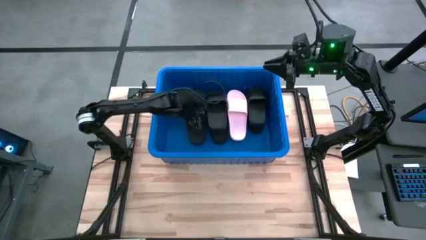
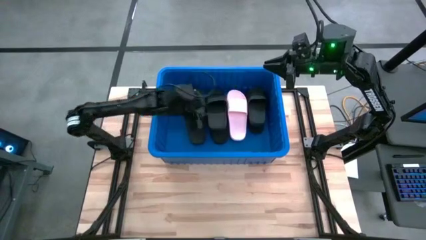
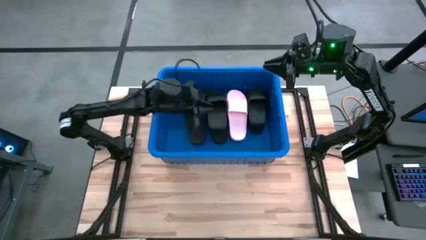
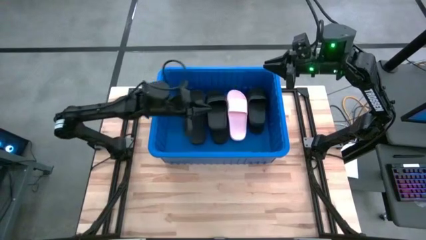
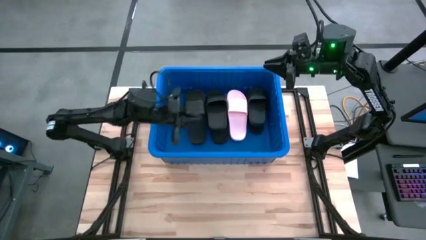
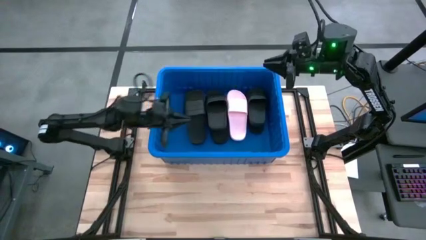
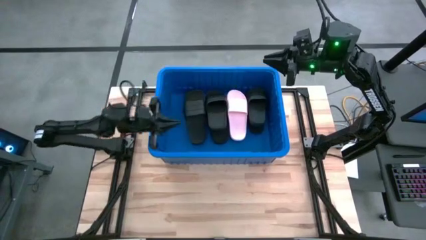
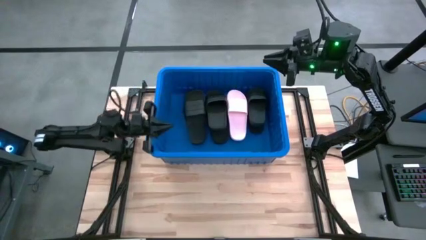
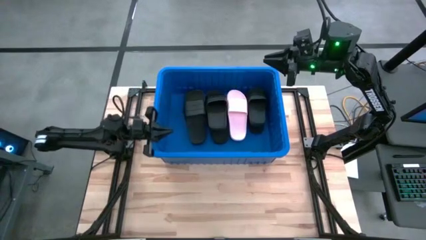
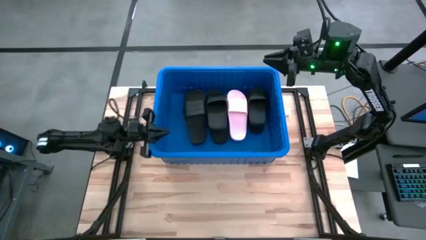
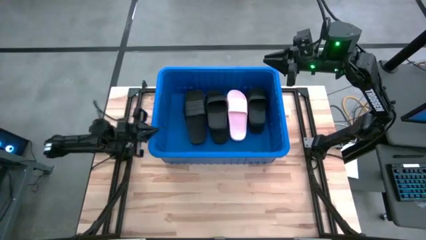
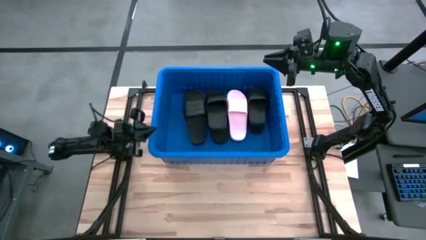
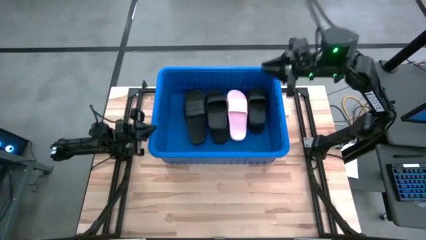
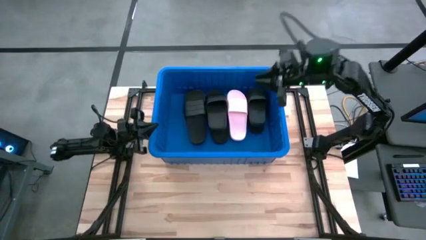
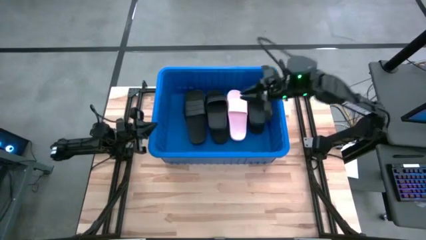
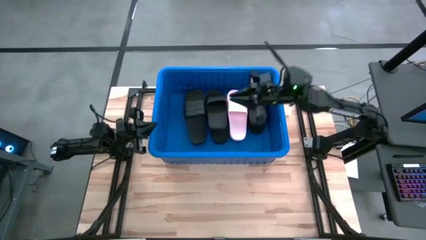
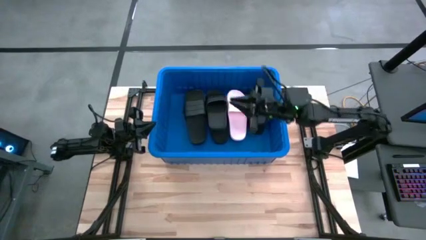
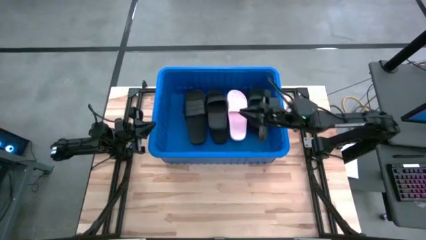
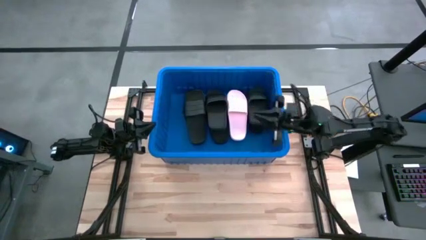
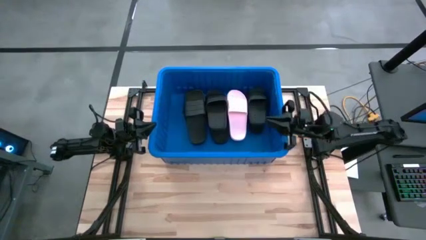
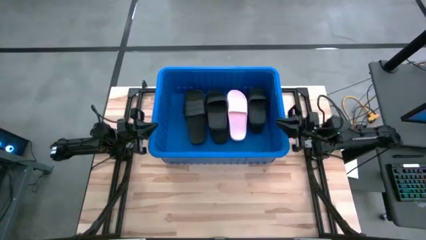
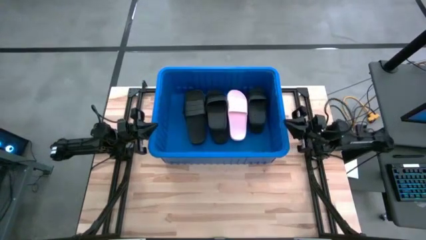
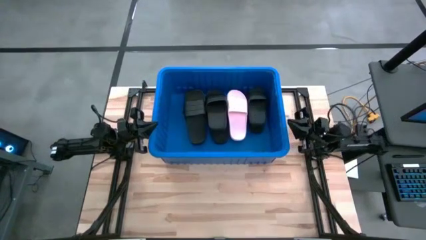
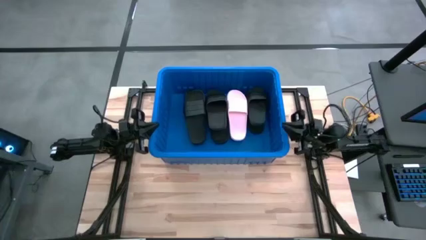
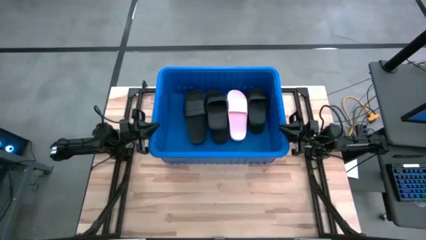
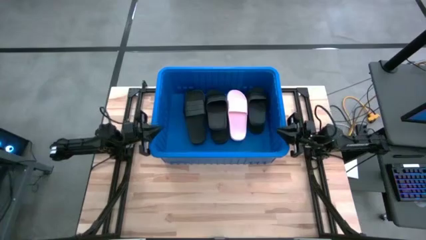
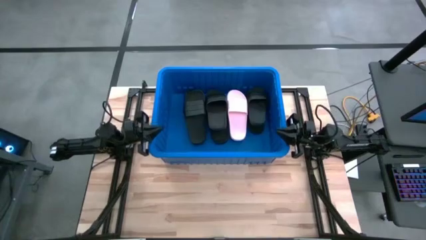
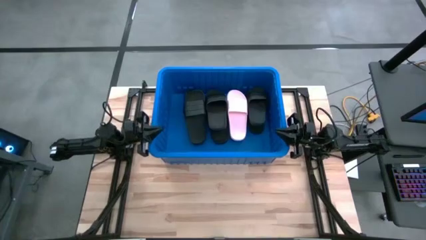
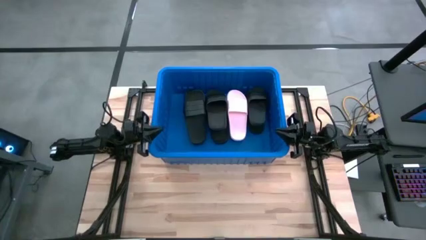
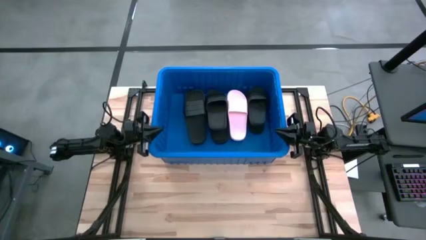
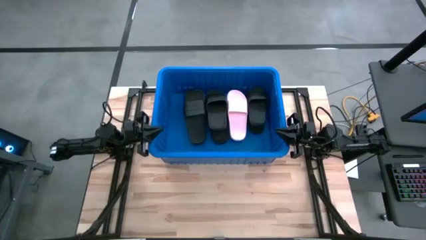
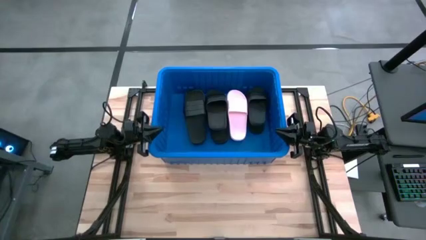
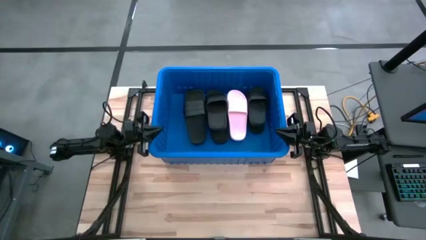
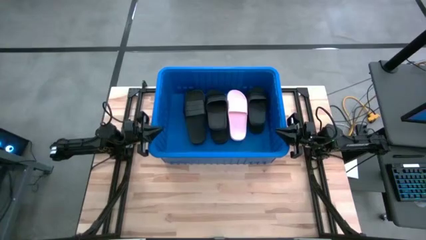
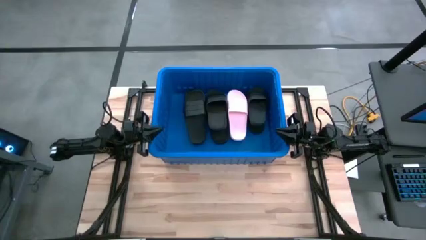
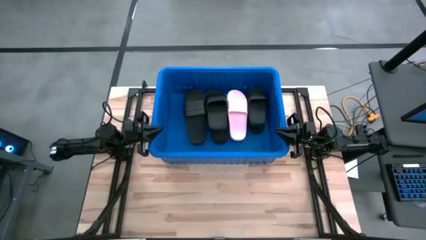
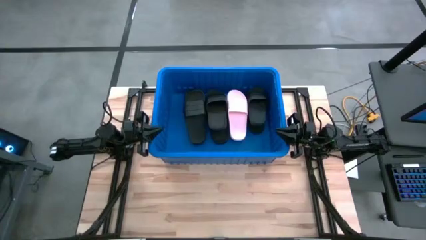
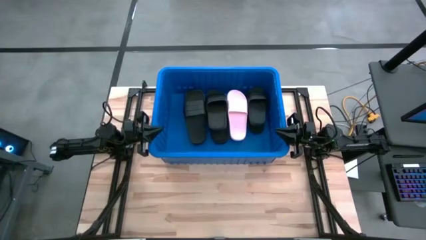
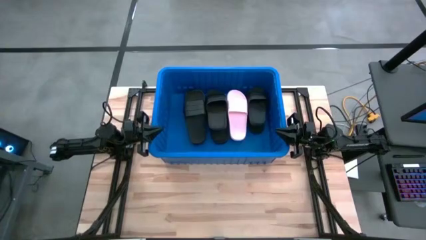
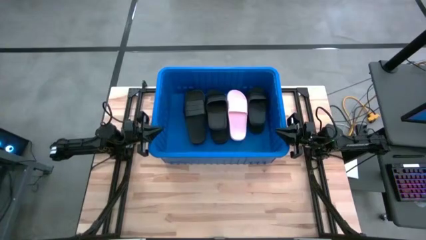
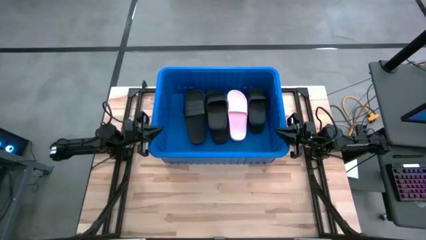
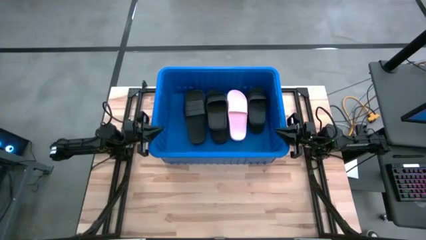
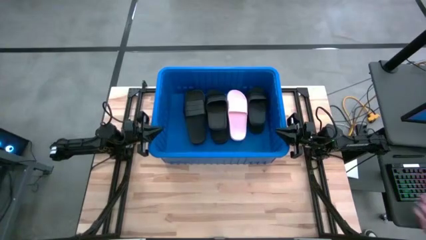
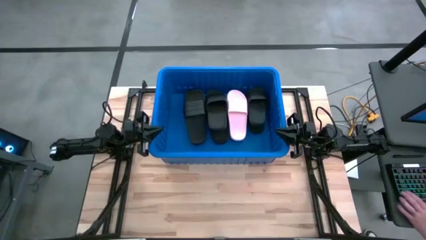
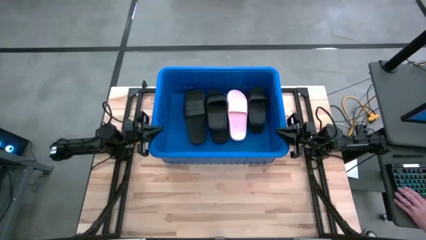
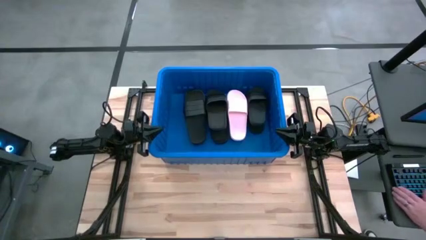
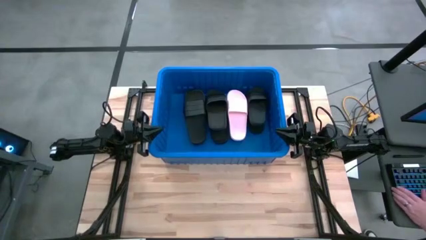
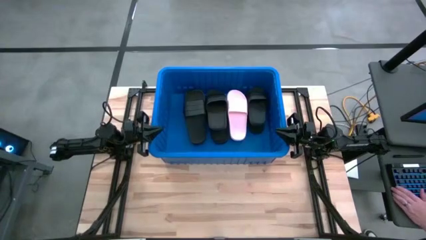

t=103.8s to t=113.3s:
Task: Pick and place slides into bin
Return to Home Position

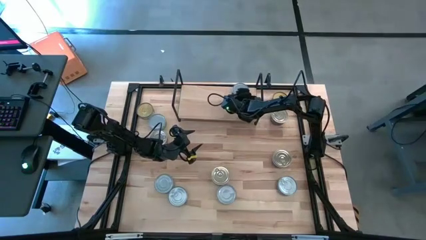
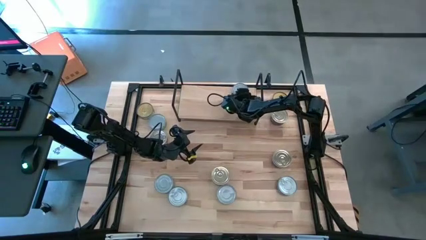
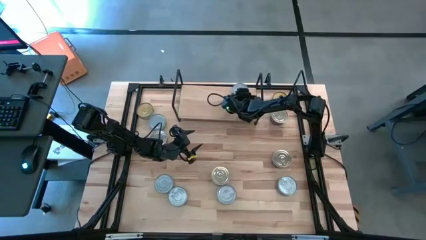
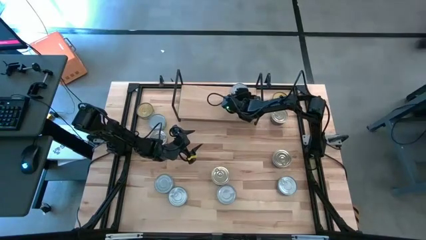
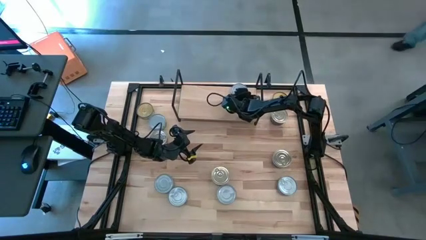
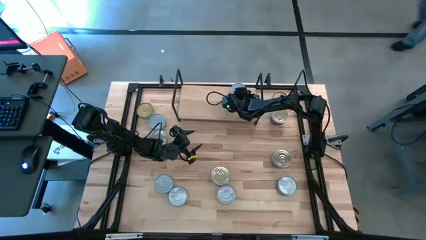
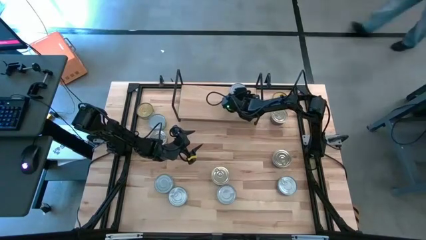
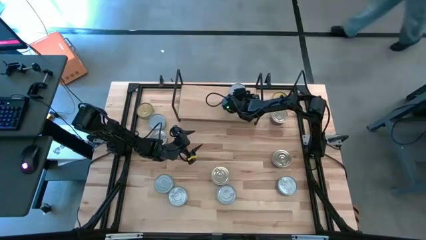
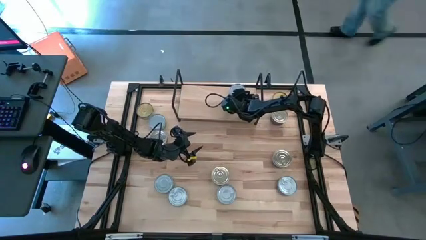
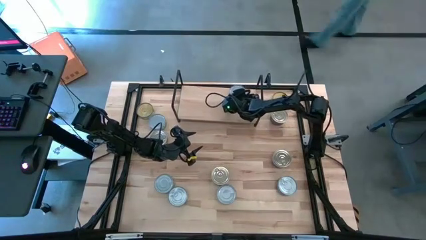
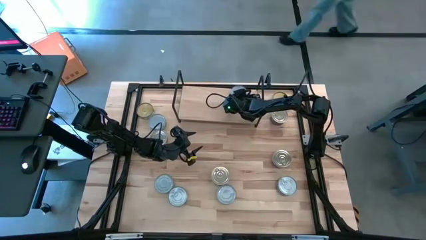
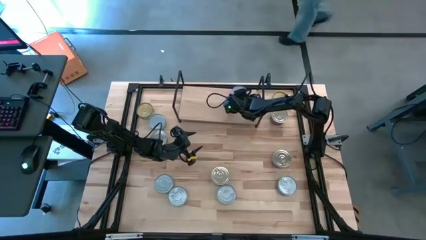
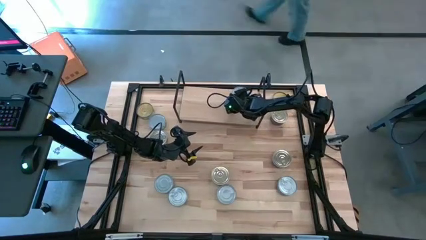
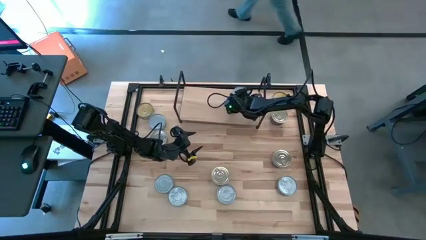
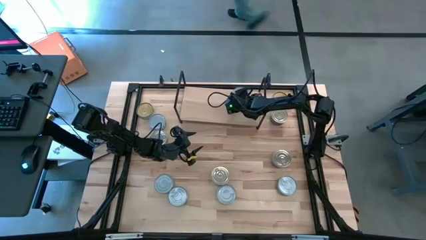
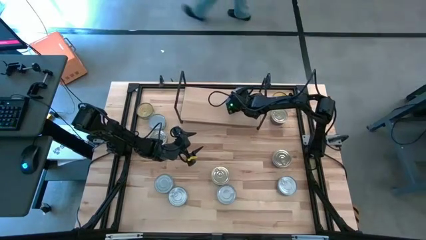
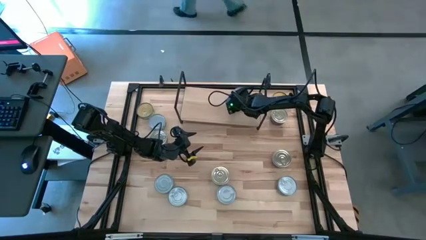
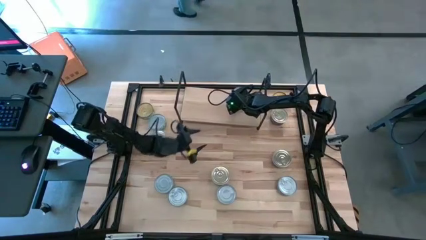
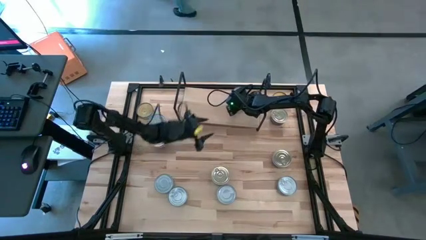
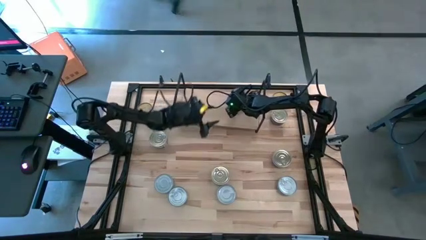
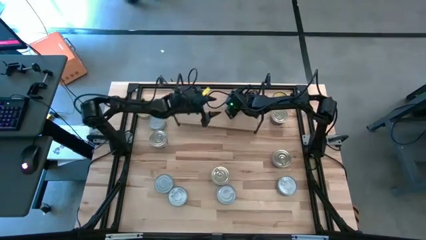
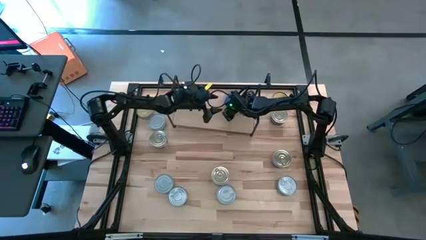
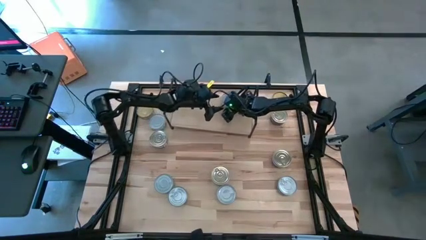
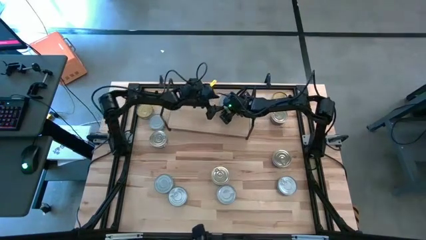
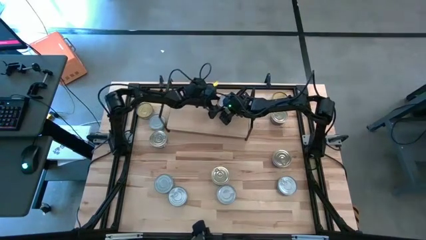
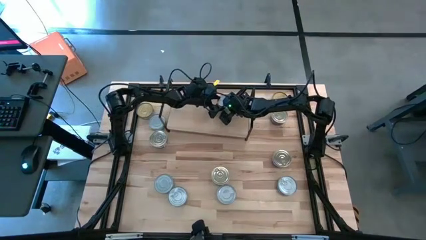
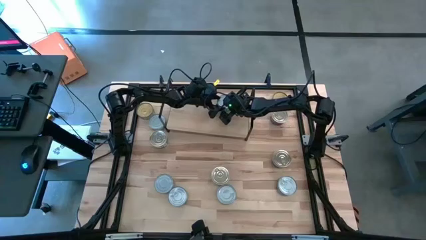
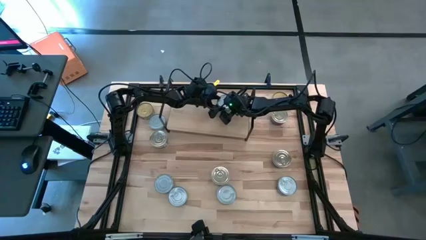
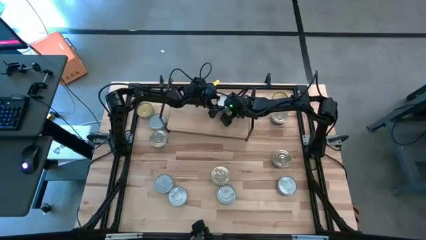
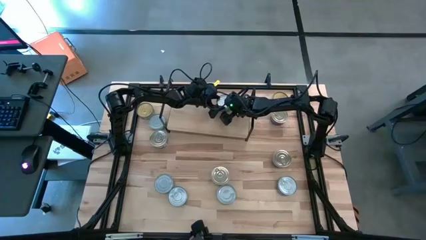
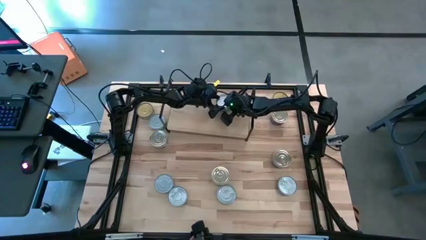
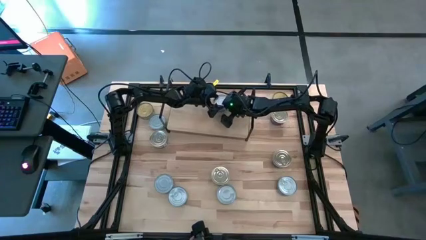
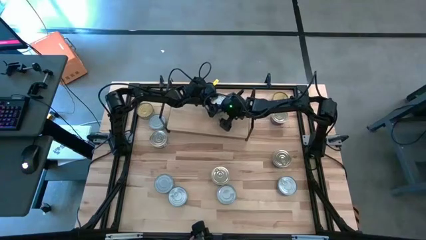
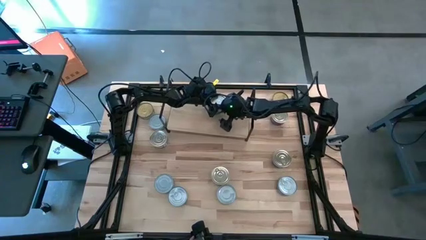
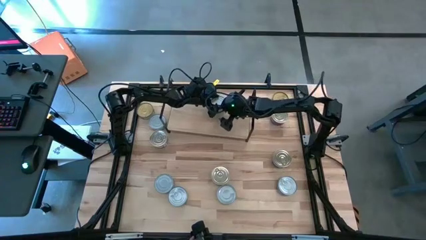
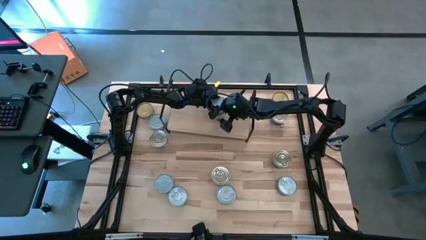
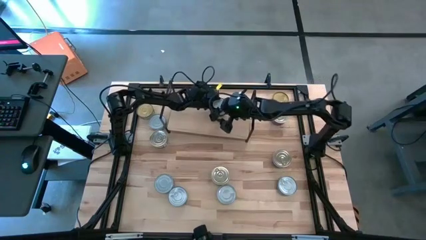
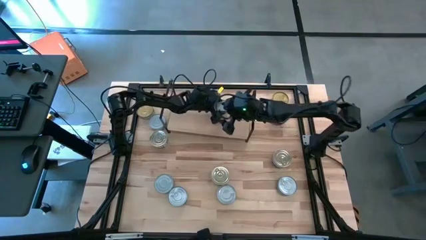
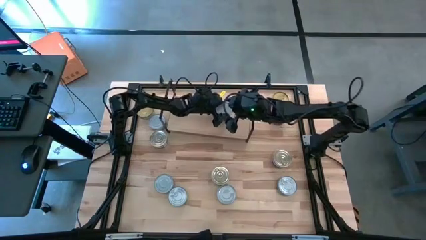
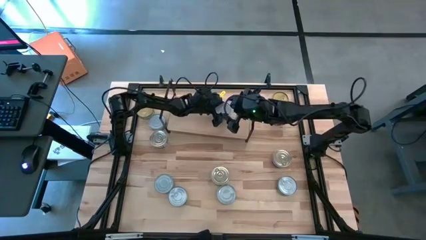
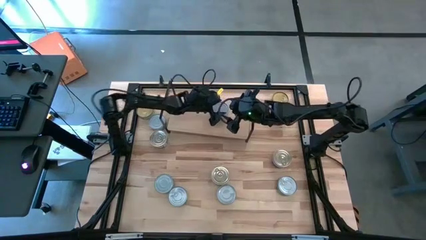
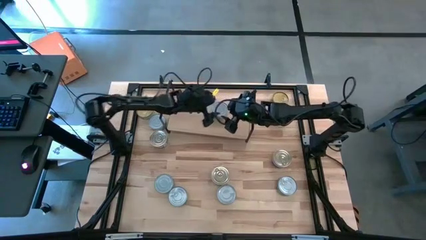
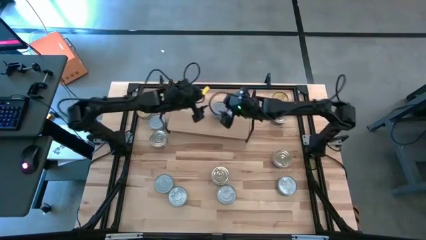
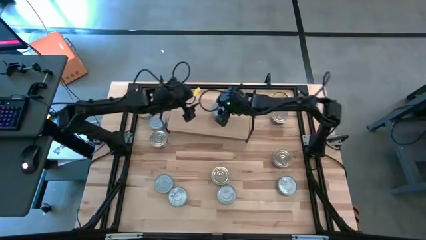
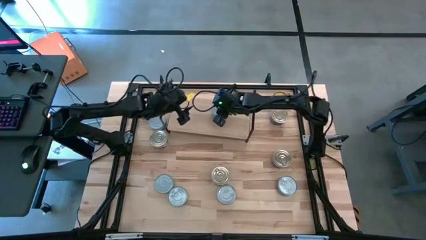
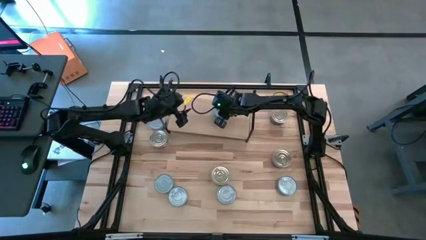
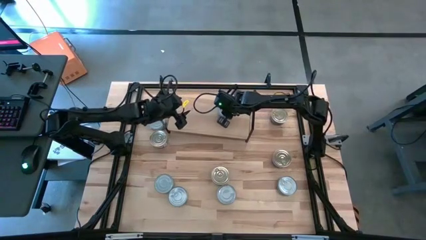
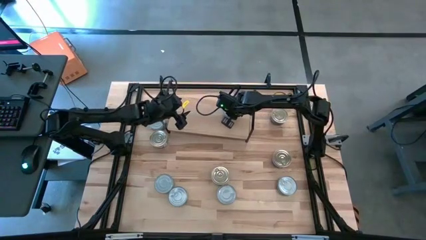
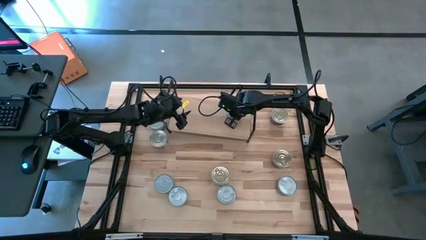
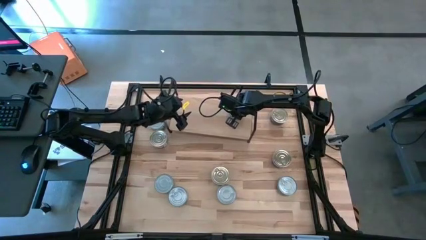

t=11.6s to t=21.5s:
Task: Stack canned seafood by type on shelf
Put the green-white tuna can on the shelf
